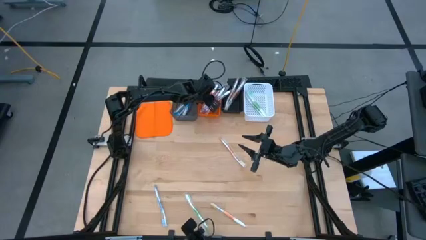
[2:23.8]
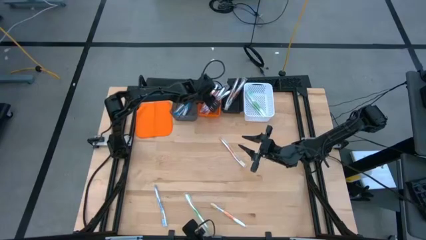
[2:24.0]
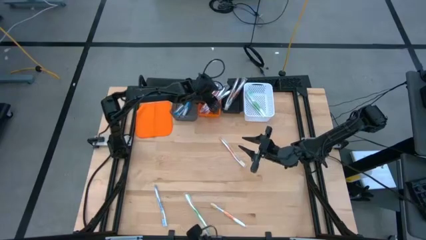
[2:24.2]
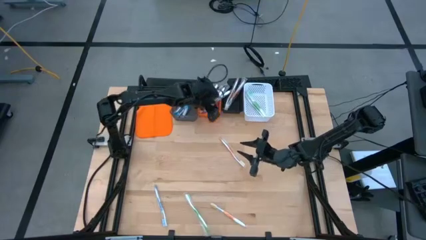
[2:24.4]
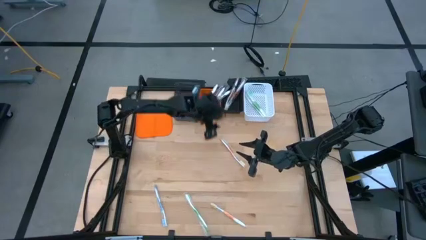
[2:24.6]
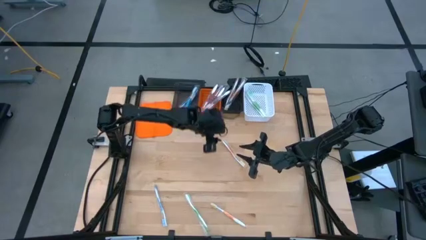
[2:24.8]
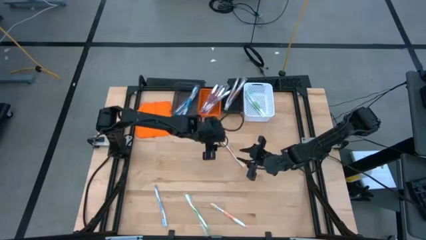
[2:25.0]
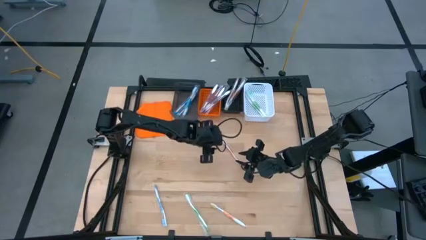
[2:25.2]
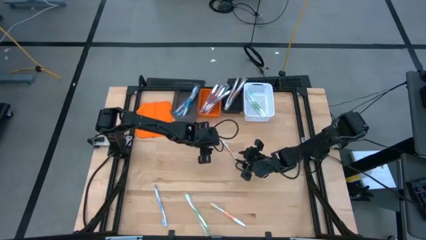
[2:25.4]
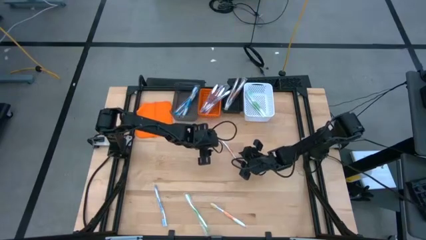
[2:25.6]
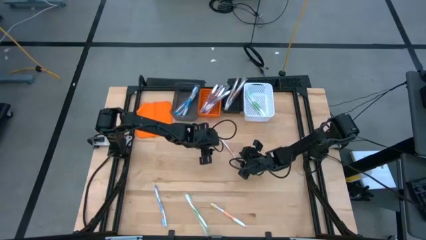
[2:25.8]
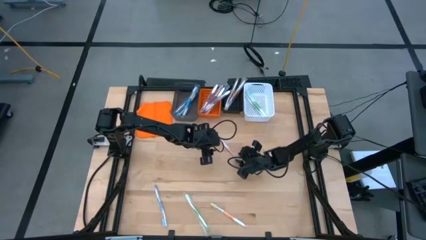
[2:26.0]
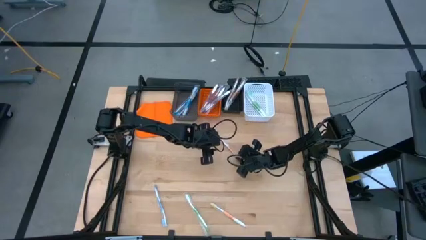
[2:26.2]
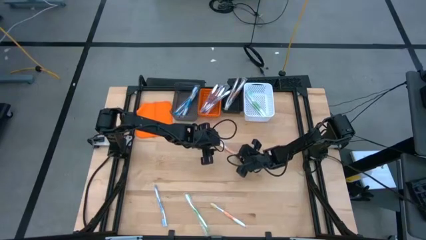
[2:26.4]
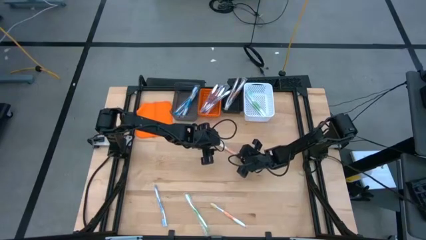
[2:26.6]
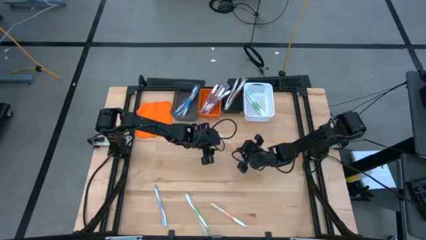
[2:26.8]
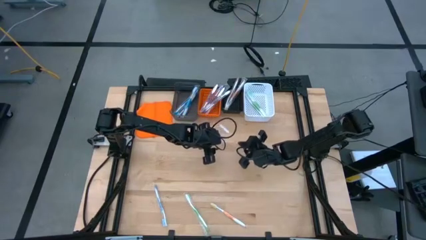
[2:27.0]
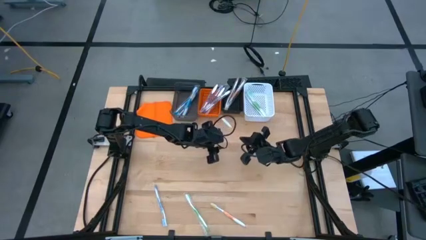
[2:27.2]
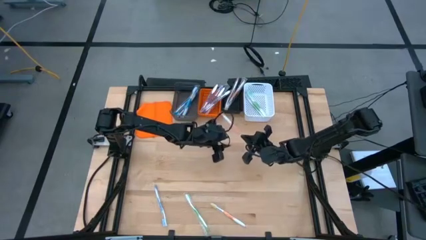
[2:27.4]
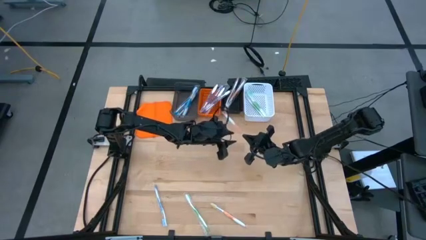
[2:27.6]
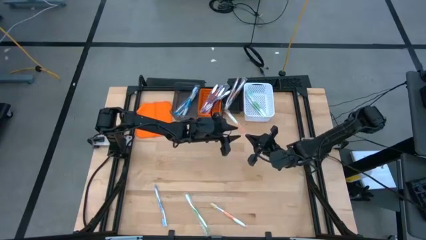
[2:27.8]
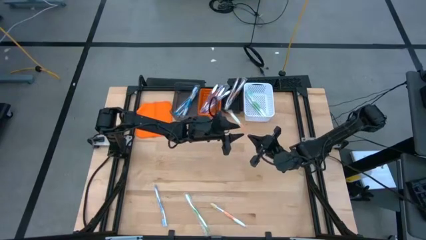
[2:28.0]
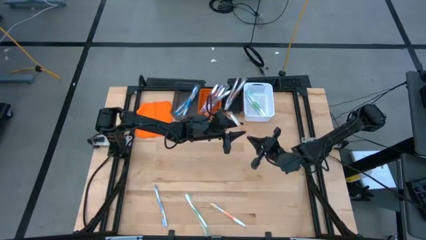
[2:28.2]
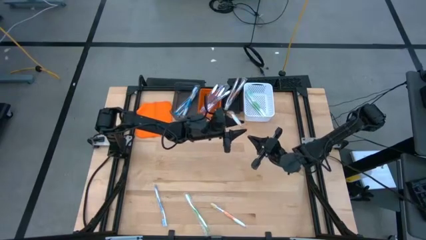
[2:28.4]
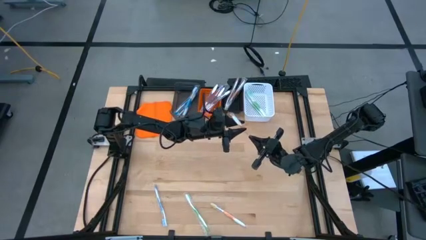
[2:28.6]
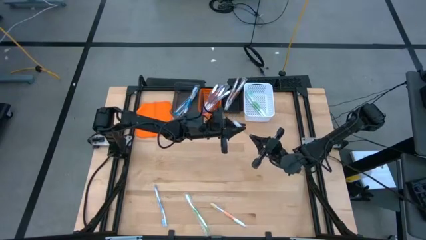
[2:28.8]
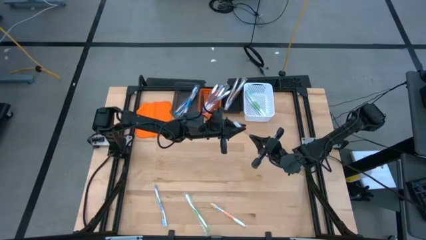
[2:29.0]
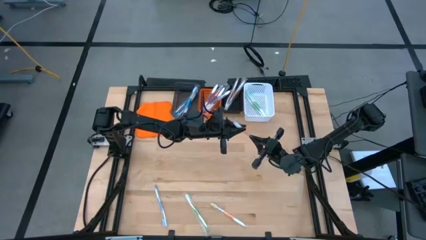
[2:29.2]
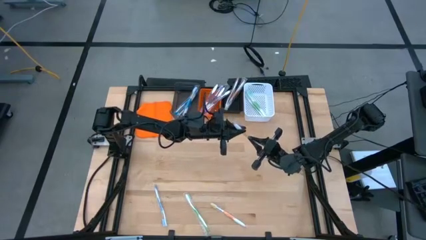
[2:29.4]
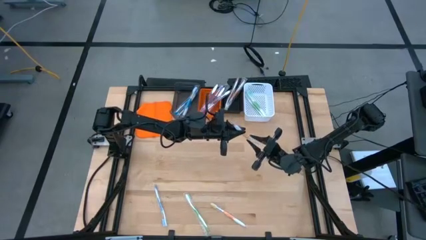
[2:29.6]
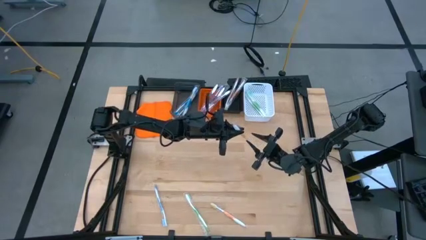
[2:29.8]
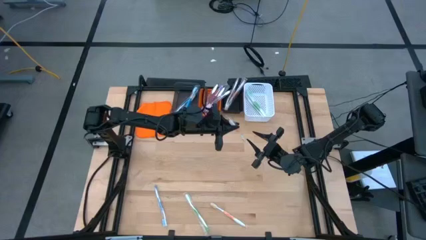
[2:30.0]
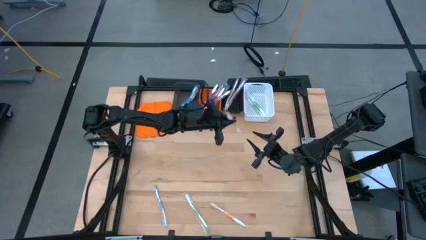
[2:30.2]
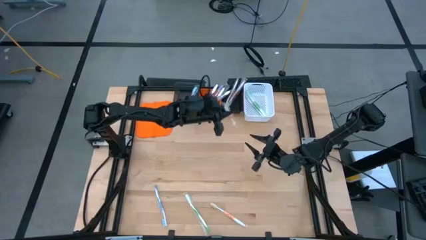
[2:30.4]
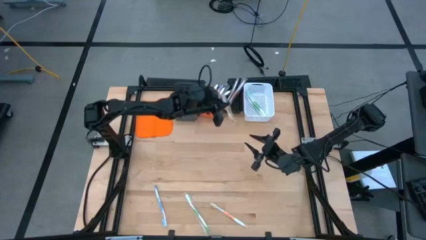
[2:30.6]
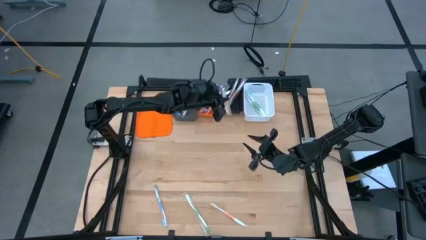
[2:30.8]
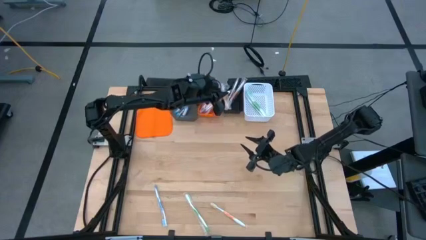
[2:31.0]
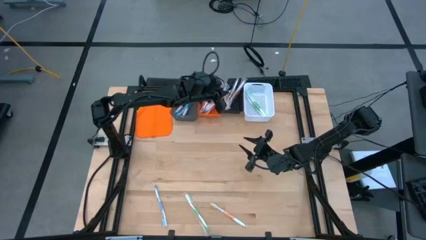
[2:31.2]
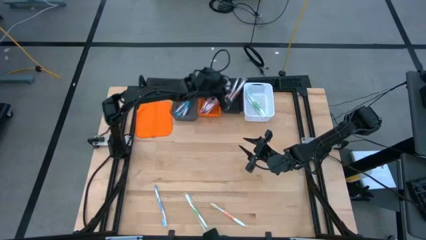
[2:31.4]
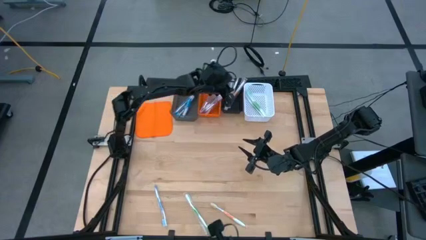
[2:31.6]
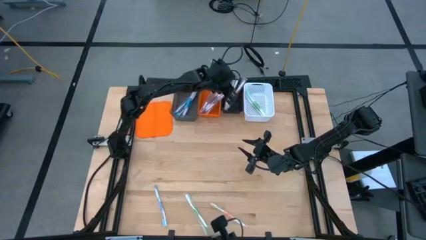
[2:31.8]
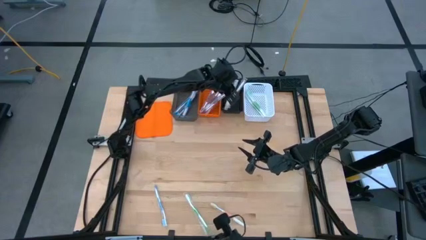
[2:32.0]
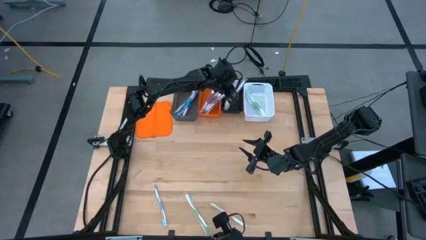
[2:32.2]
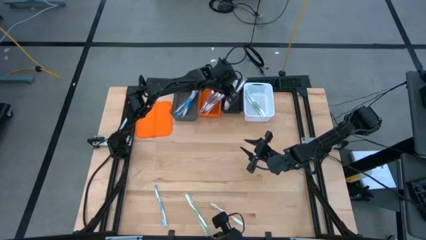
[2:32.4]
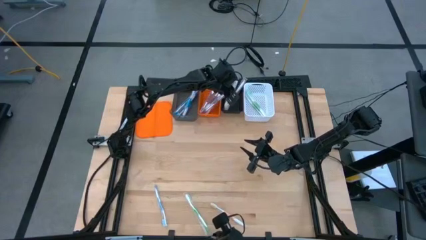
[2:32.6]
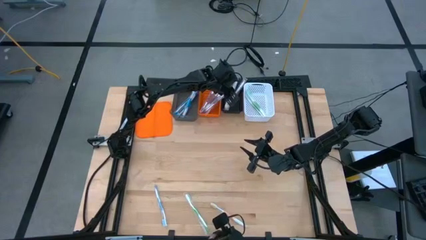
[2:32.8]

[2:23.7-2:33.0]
Task: Pick & Place Toothbrushes
Put the orange toothbrush into the black bin

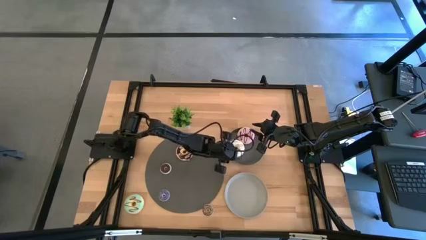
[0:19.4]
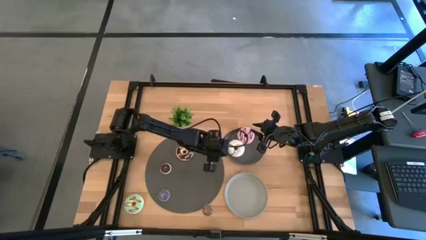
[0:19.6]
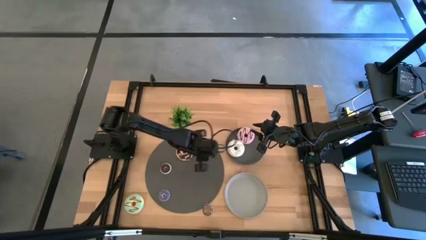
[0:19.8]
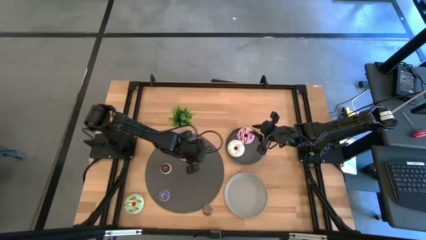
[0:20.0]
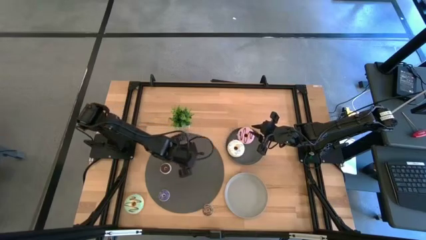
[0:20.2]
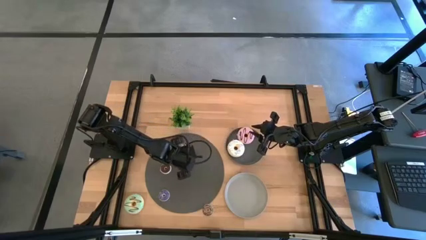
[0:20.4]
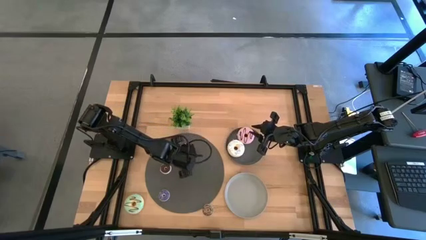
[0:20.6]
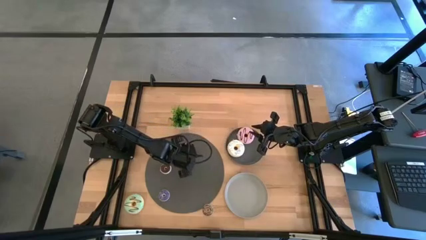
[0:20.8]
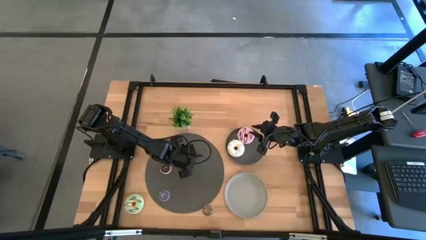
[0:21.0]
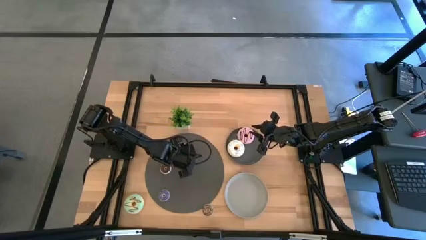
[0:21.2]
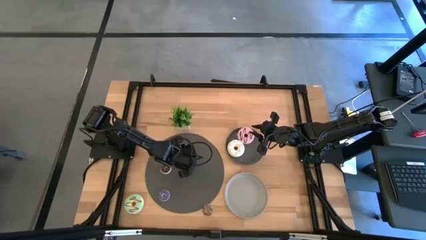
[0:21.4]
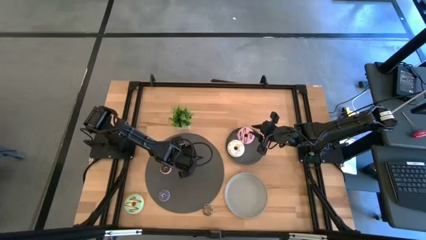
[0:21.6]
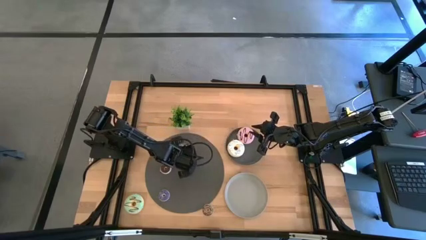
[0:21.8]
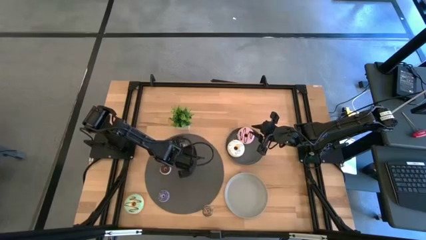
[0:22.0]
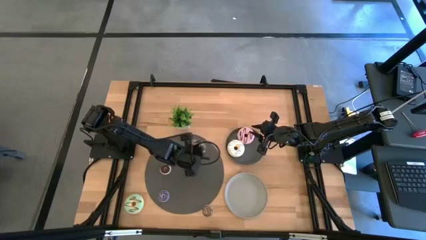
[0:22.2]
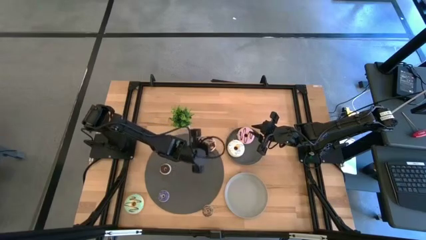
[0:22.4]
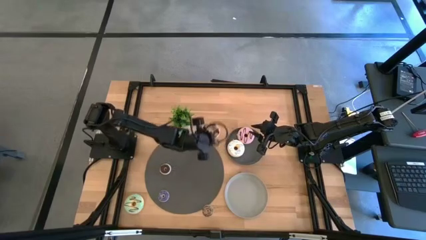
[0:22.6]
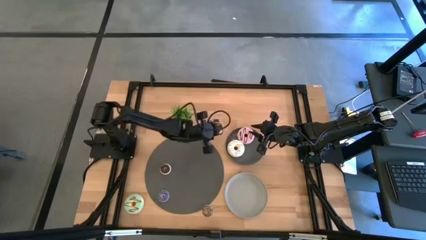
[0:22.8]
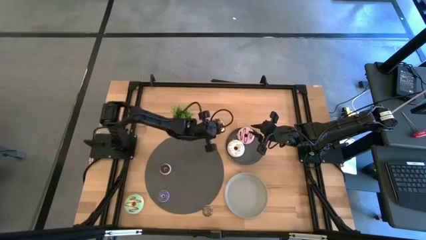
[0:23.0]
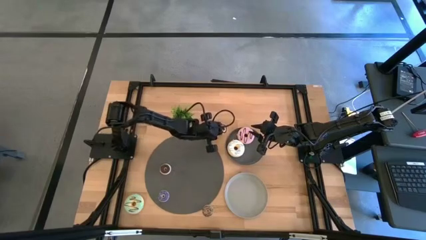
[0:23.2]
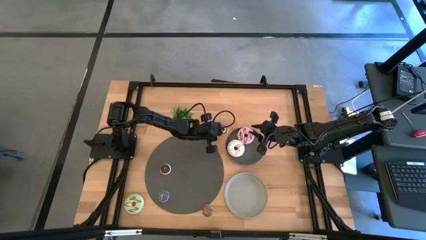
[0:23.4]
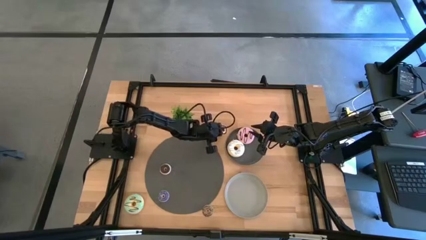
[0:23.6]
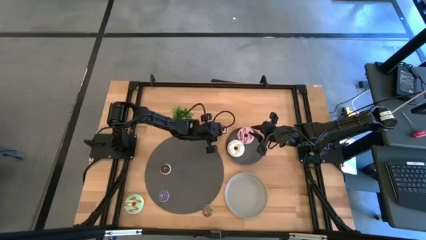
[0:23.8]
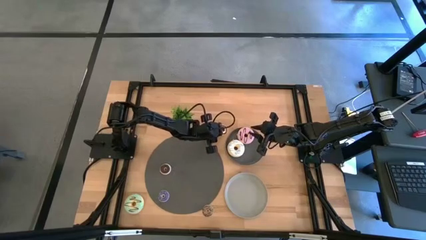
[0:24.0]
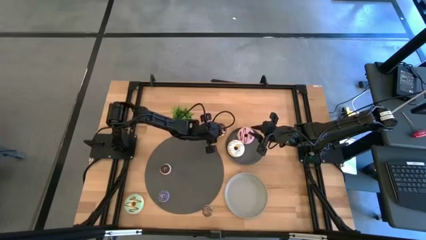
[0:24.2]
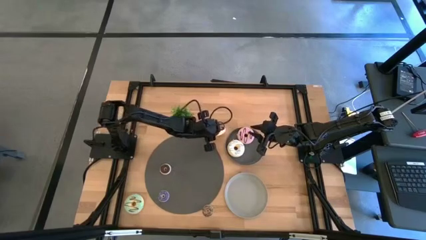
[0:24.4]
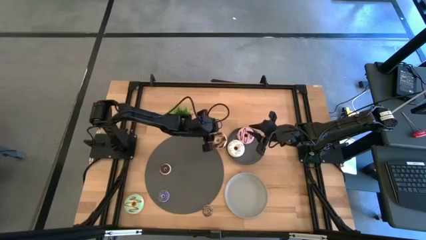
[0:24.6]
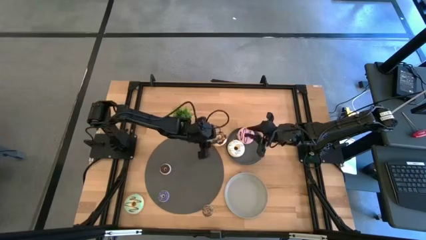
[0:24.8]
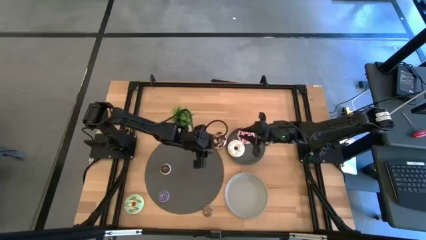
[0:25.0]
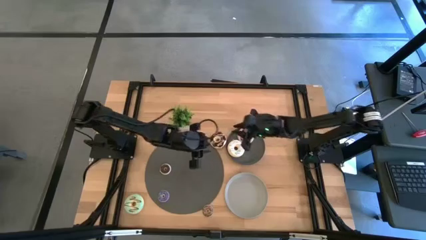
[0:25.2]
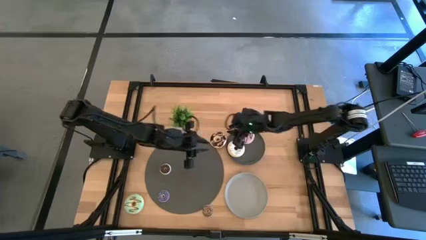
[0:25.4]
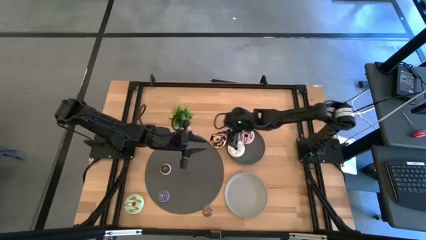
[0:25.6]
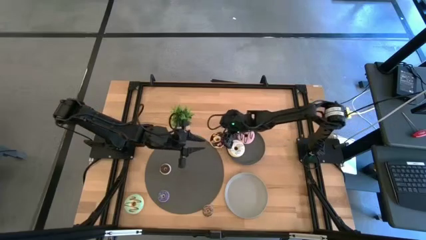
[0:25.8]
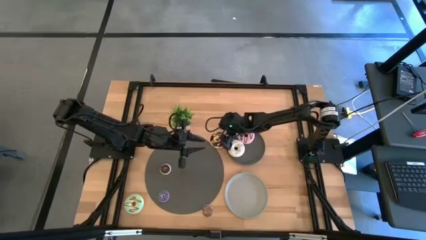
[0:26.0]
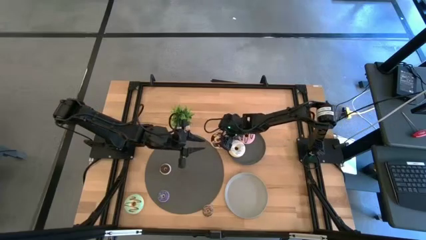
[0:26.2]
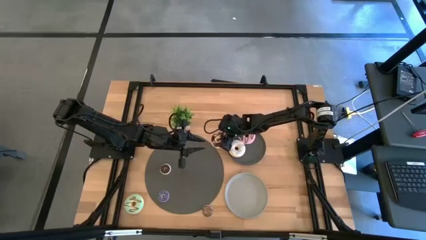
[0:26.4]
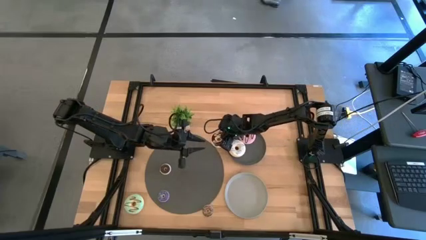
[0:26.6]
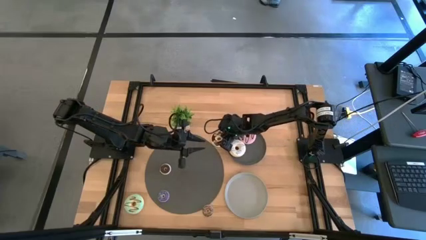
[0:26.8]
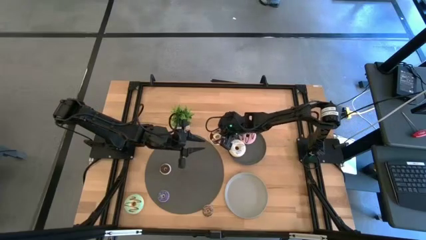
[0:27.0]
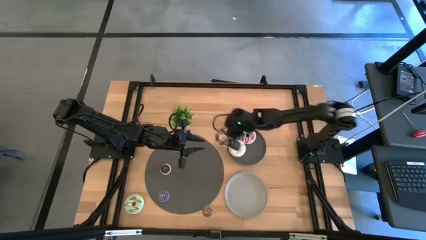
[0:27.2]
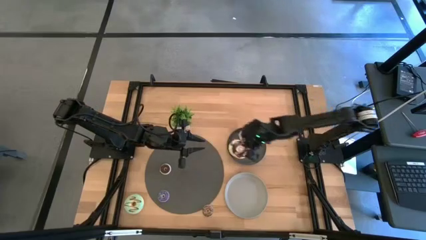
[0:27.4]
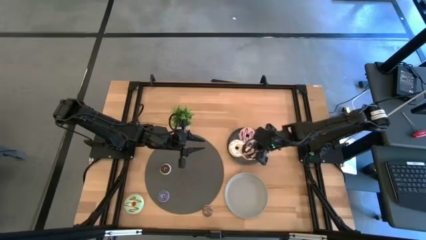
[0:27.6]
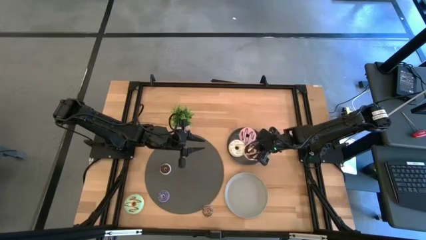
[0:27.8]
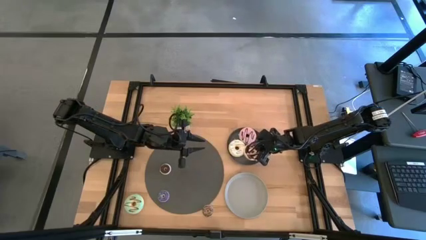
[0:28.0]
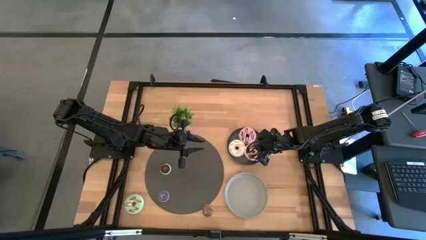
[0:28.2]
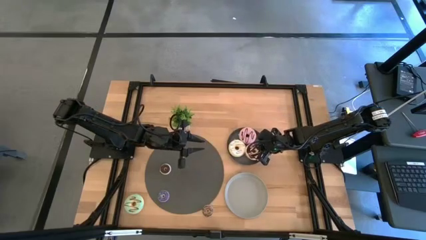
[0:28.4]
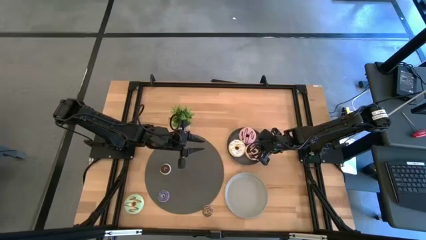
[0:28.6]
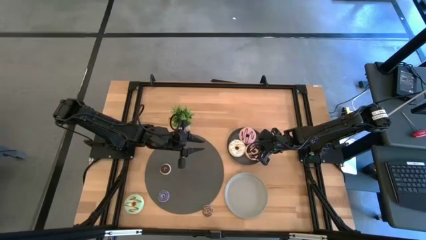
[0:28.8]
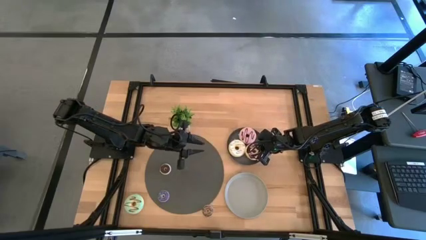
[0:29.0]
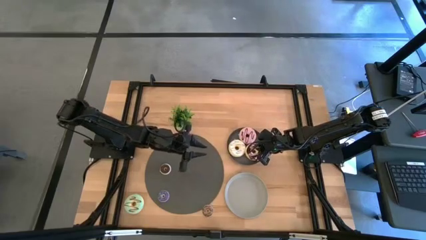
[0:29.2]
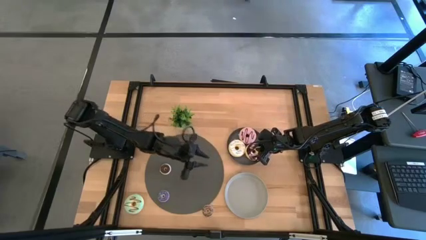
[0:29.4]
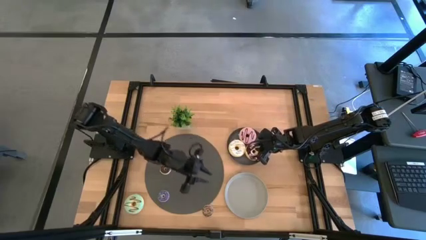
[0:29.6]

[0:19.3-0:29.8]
Task: Pick & Place donuts
Put the large black donut on the black plate
